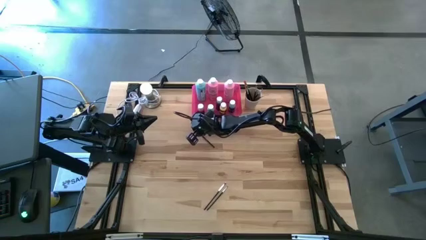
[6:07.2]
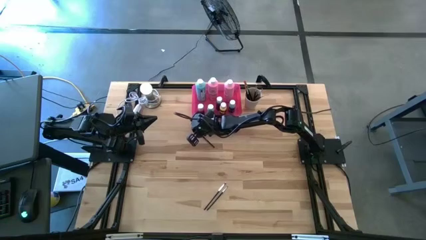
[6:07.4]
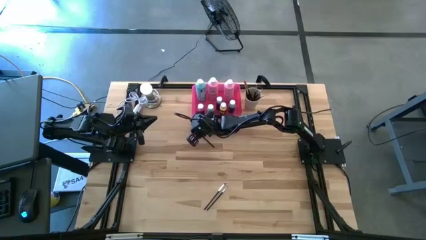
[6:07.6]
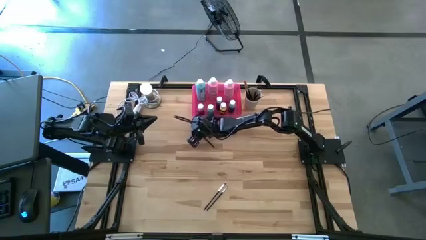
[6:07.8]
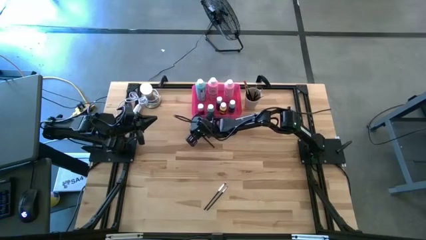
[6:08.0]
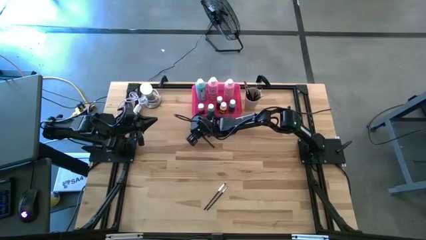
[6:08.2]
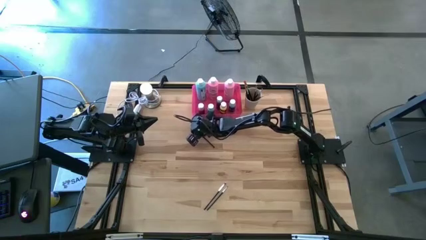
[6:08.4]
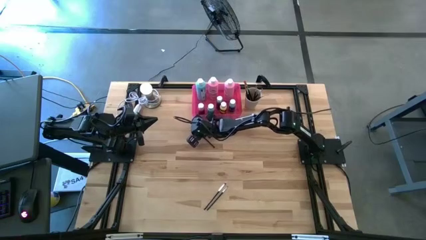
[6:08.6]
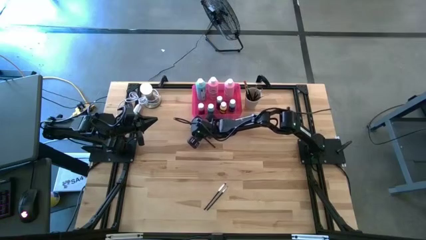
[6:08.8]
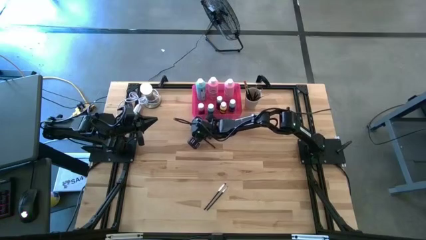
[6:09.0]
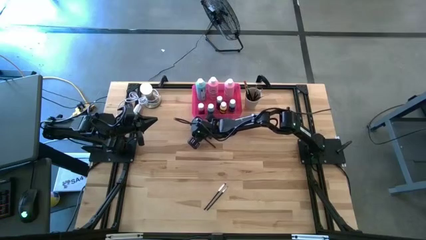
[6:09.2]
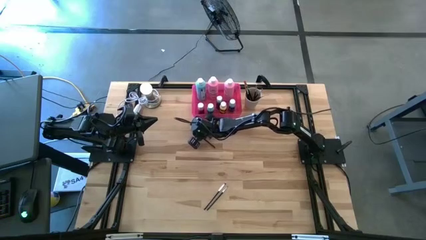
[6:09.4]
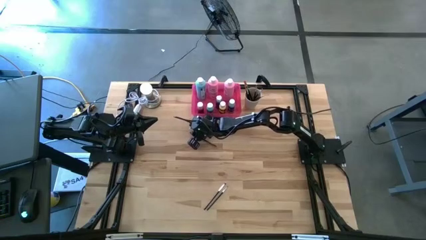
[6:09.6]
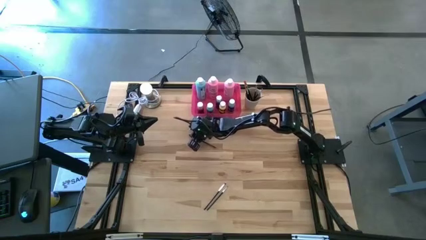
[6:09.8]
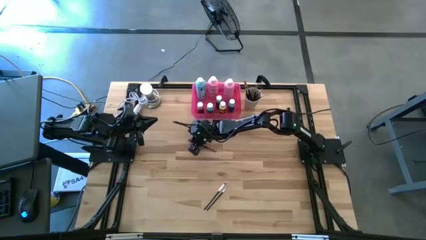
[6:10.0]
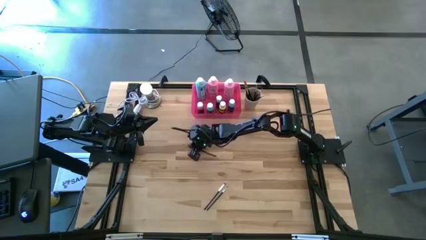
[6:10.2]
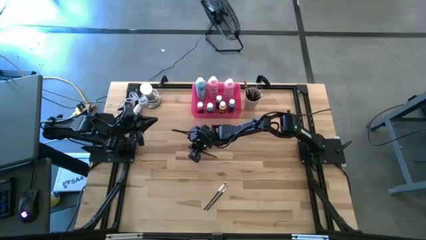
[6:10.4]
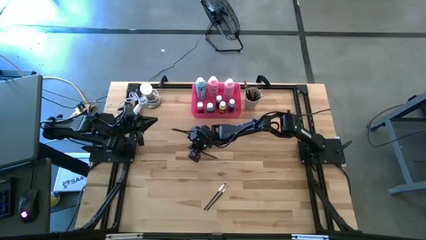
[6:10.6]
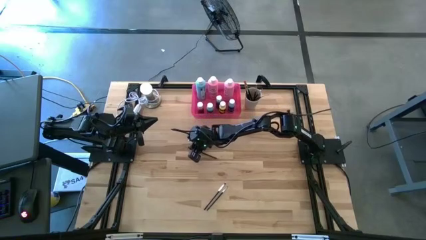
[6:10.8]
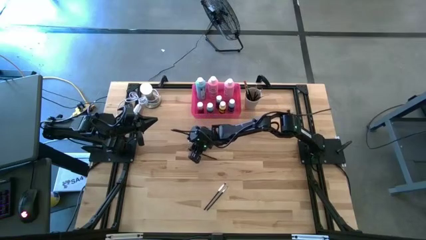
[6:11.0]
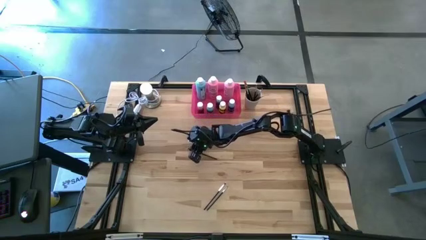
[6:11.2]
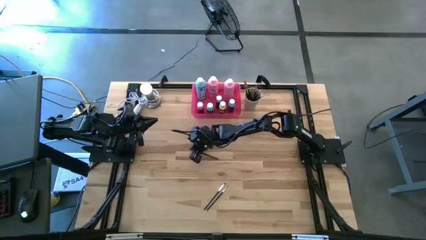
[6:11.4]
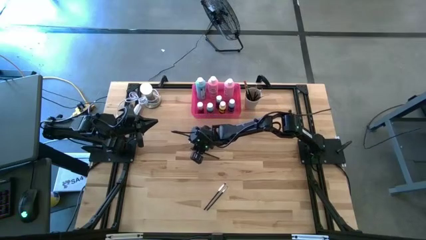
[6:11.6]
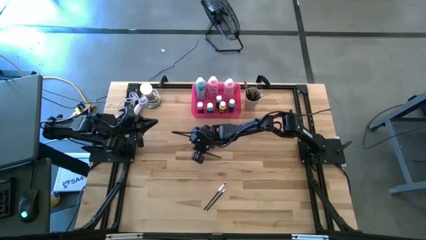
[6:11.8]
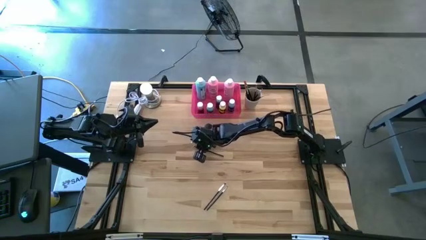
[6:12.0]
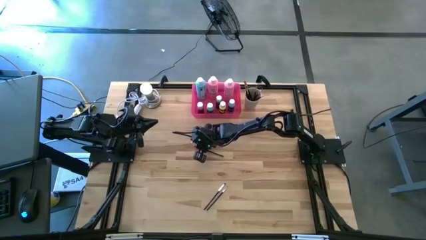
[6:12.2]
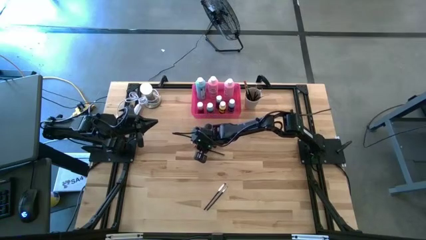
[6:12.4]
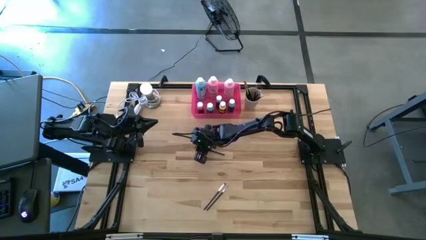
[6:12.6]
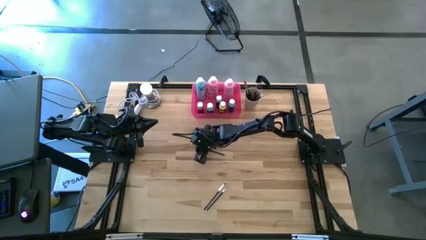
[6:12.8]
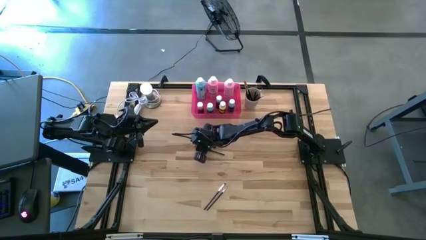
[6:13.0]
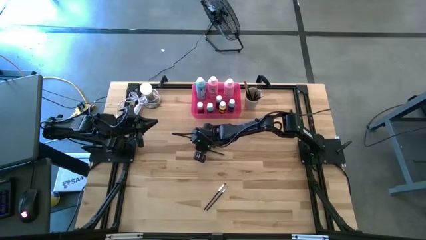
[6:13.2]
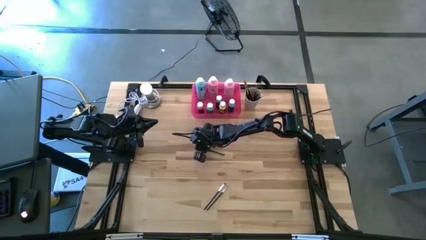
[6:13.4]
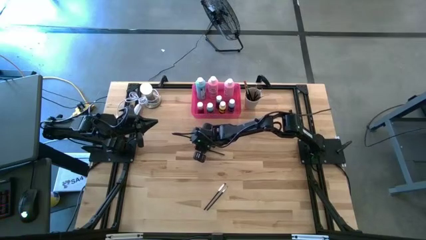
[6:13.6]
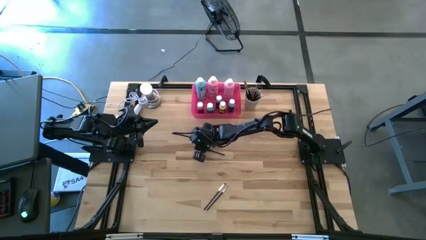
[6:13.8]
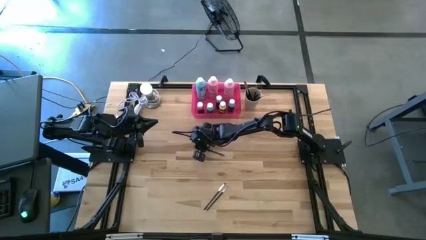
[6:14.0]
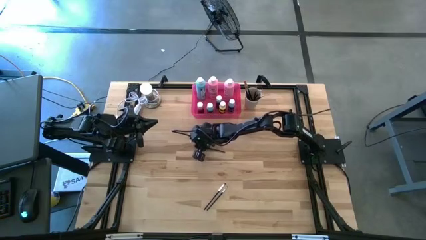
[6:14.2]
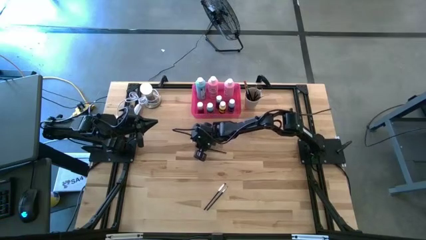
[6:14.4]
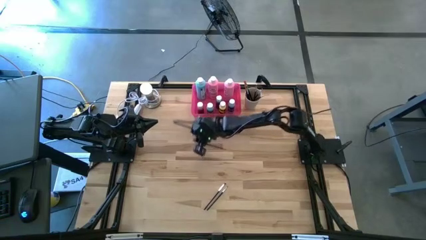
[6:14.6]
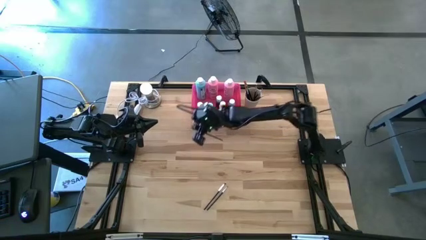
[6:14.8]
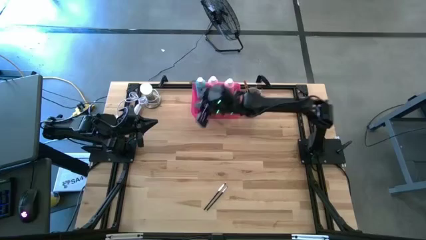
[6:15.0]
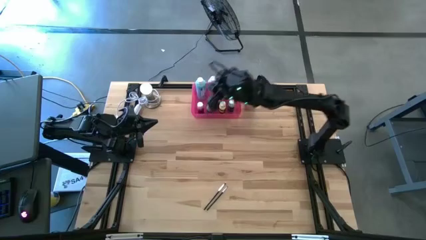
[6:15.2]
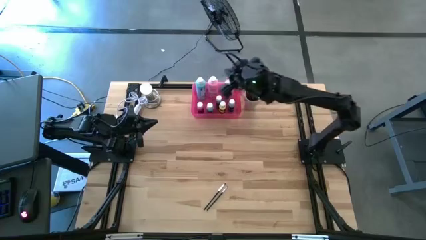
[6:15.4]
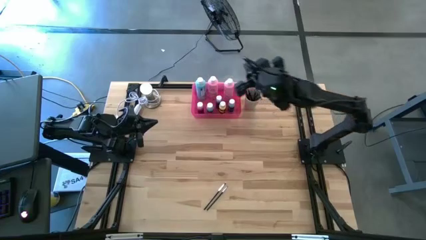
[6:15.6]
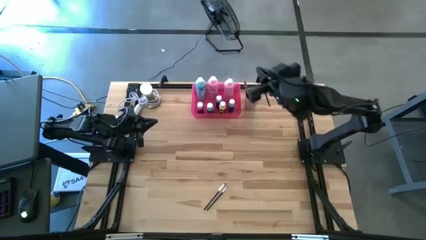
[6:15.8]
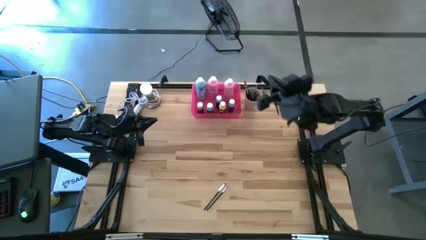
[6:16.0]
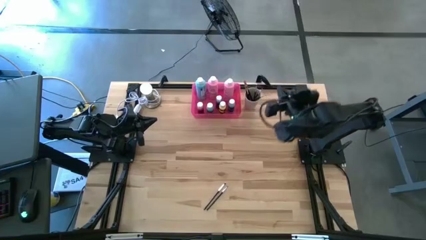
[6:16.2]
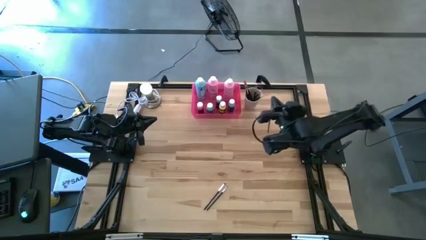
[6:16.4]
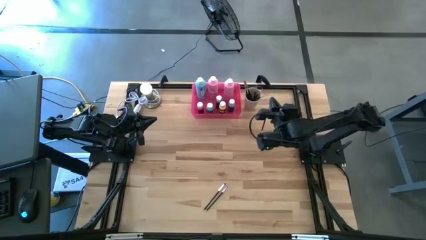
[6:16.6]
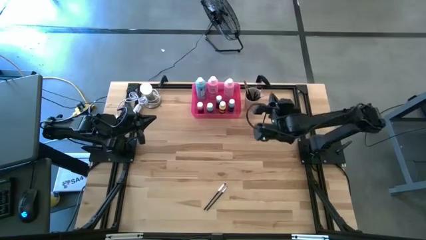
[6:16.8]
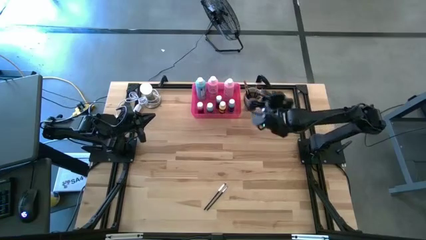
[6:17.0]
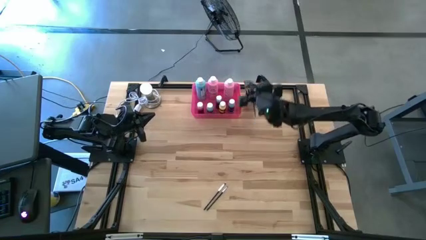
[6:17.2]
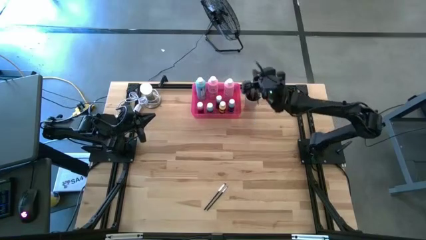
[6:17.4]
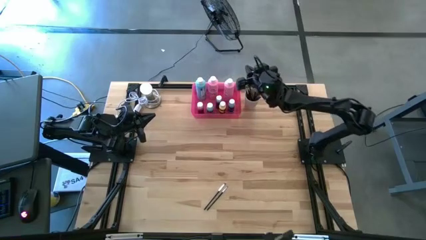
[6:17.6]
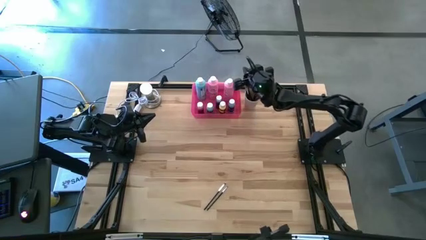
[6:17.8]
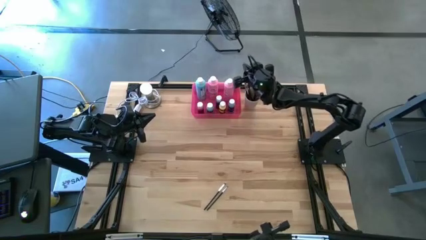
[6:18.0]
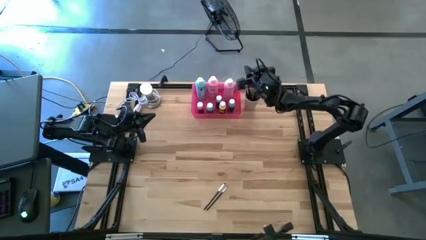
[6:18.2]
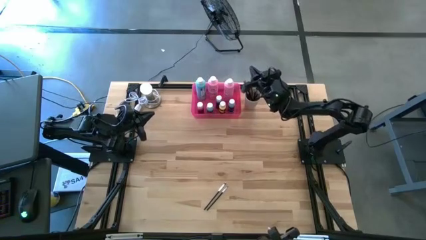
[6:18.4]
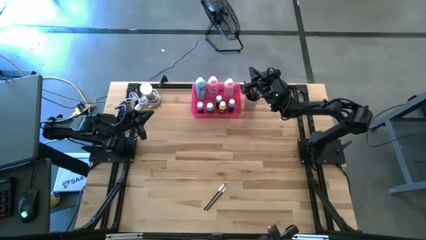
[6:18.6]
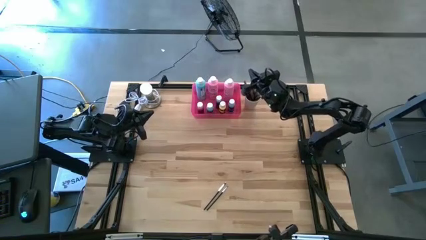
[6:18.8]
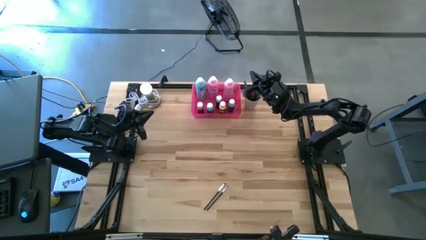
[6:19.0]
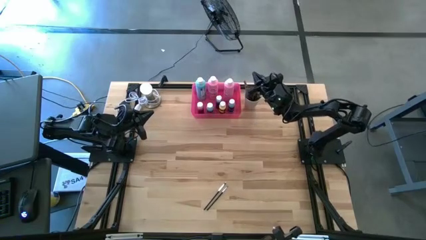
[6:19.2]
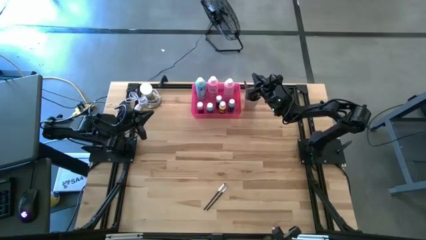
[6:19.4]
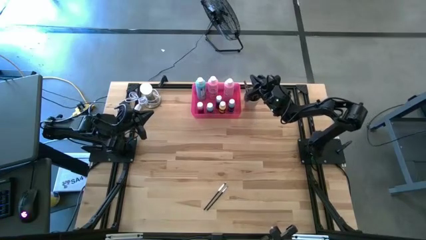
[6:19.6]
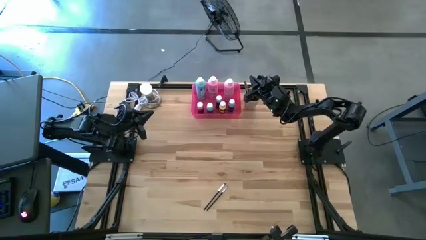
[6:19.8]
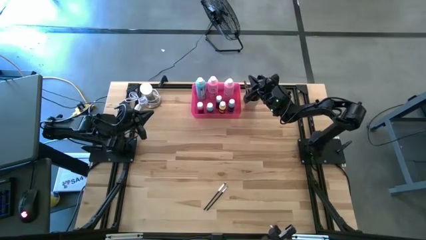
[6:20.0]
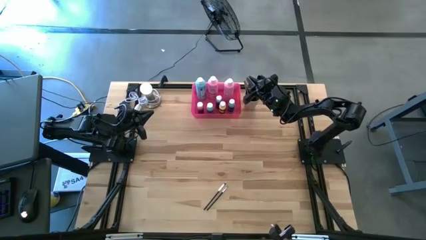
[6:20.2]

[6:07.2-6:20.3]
Task: Pick & Place Paint Supplies
Put the silver paintbrush into the white cup
